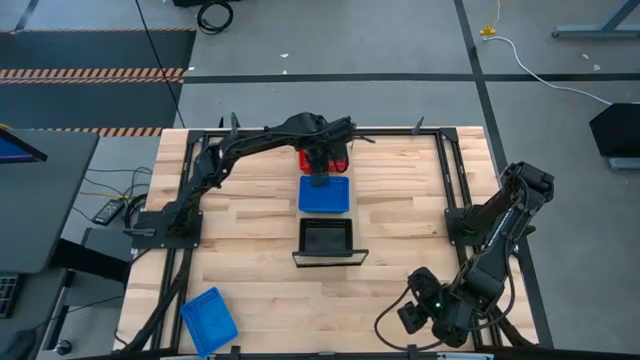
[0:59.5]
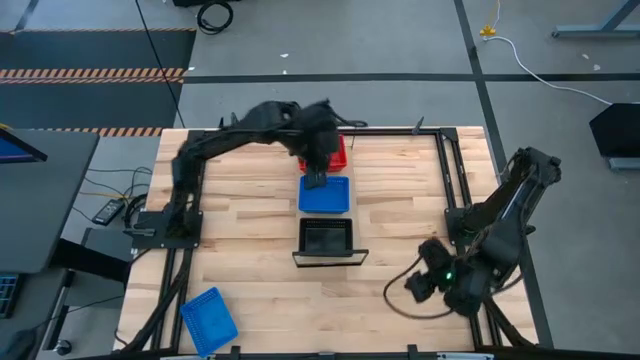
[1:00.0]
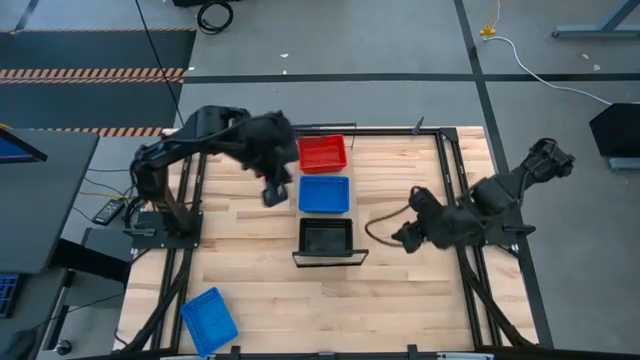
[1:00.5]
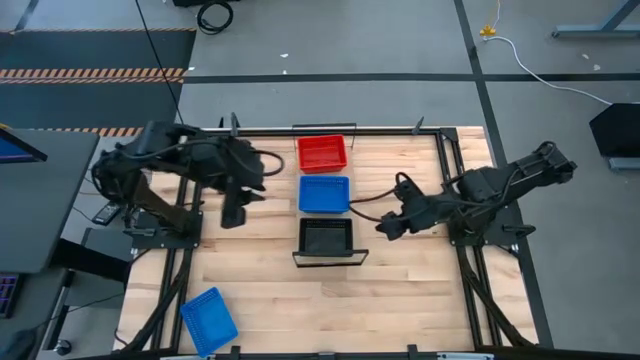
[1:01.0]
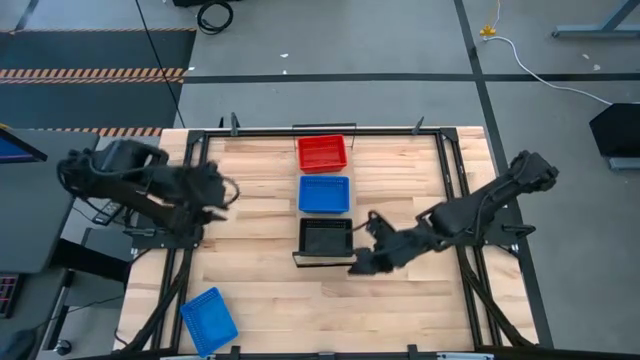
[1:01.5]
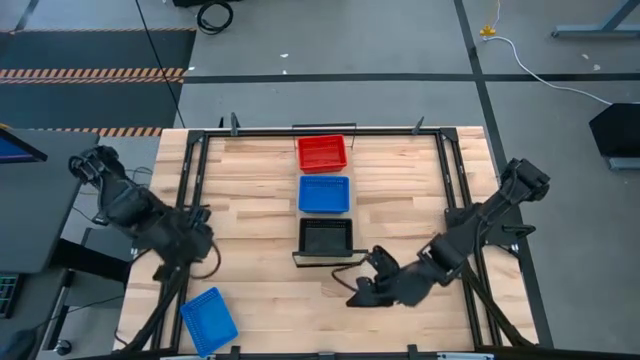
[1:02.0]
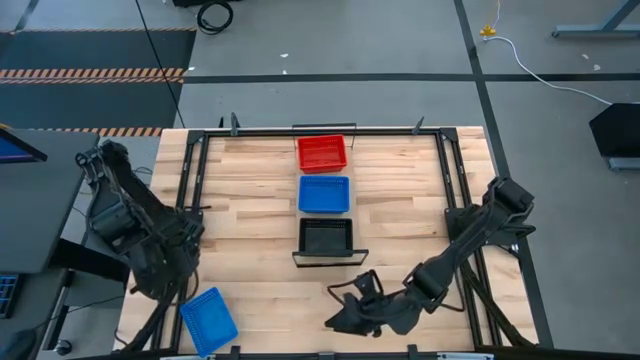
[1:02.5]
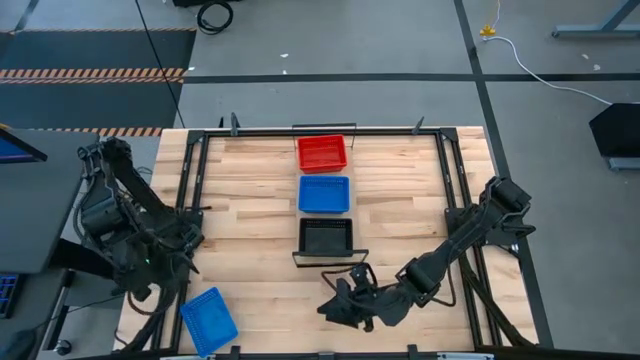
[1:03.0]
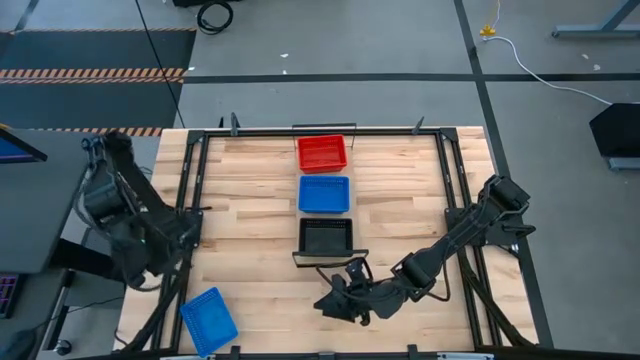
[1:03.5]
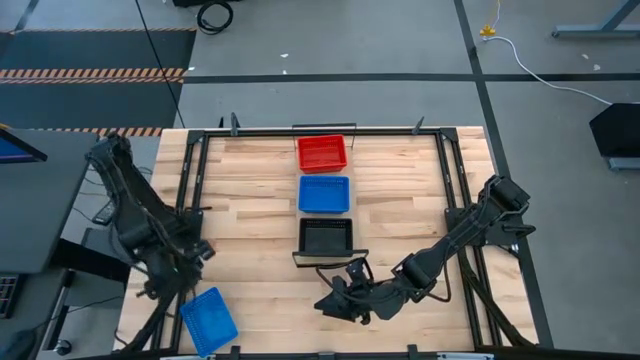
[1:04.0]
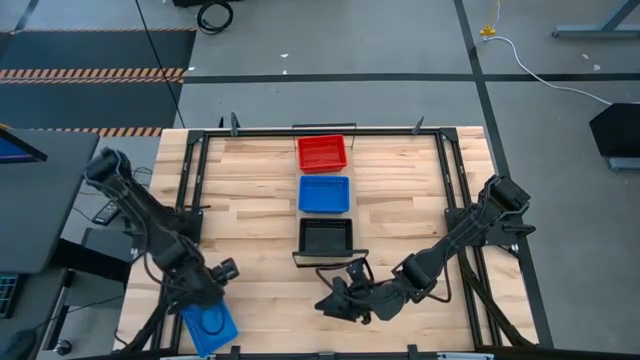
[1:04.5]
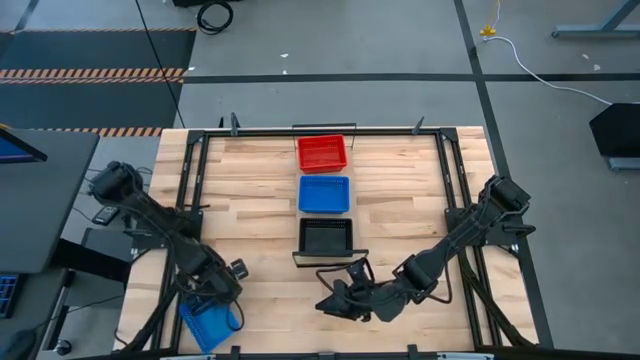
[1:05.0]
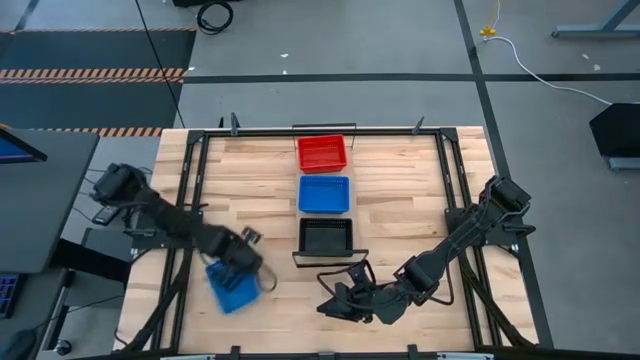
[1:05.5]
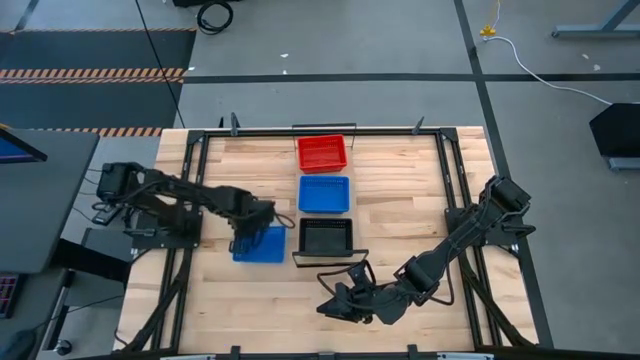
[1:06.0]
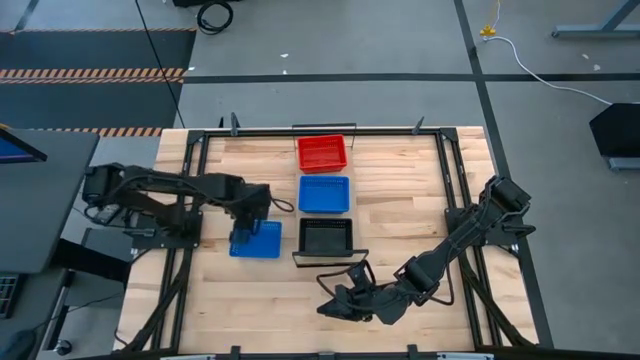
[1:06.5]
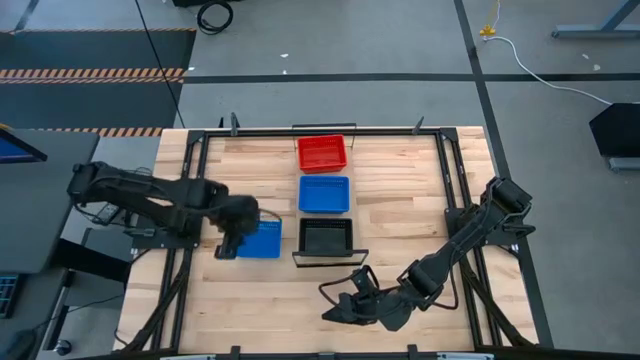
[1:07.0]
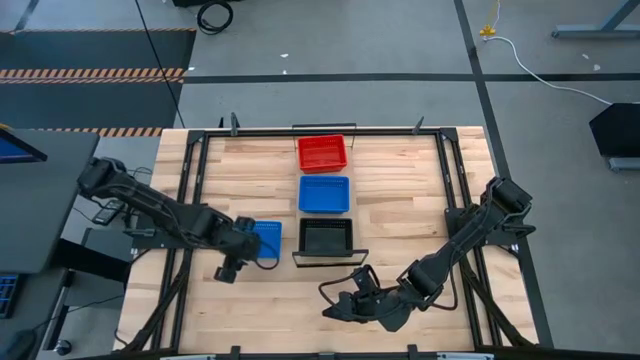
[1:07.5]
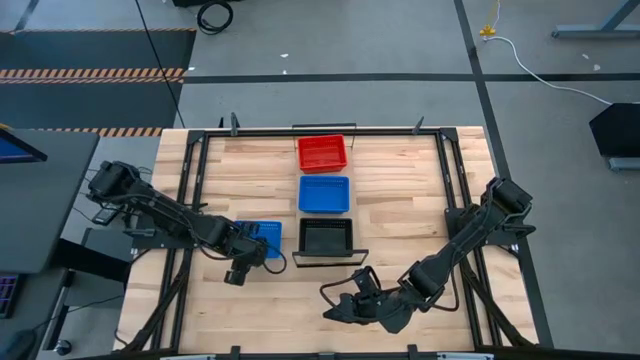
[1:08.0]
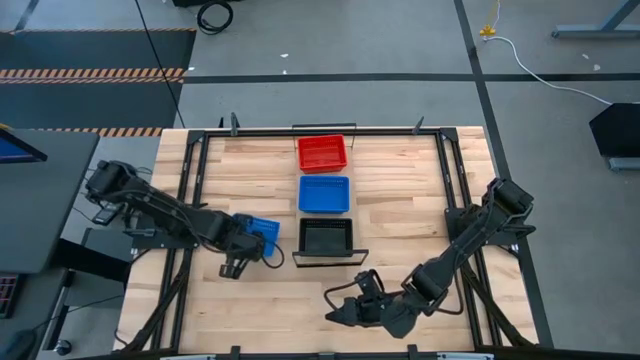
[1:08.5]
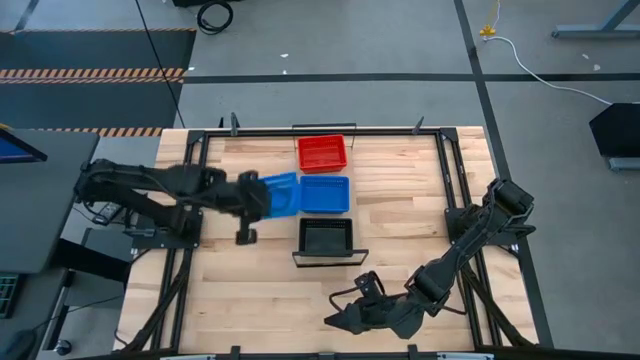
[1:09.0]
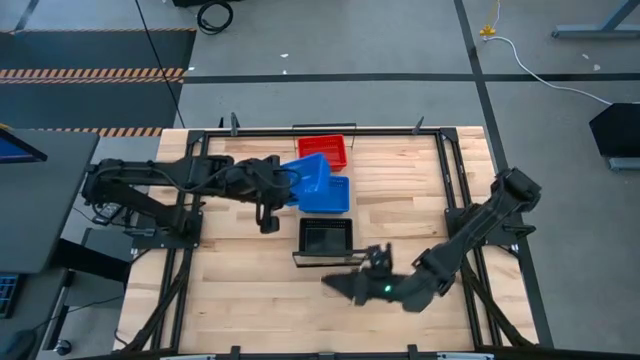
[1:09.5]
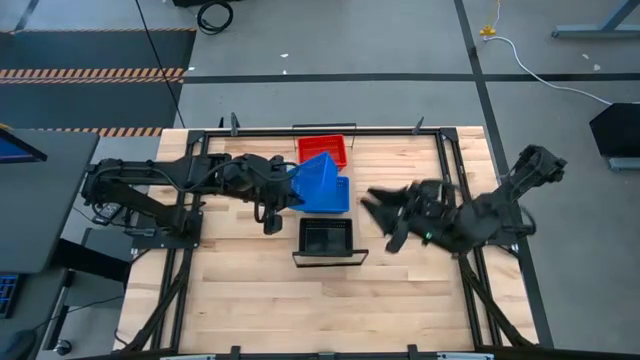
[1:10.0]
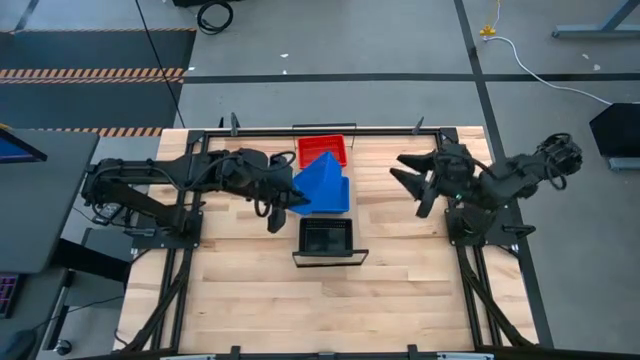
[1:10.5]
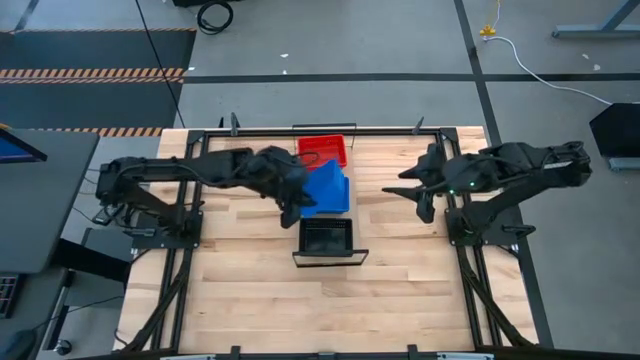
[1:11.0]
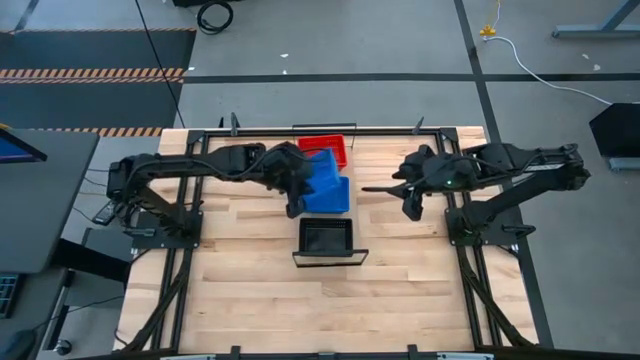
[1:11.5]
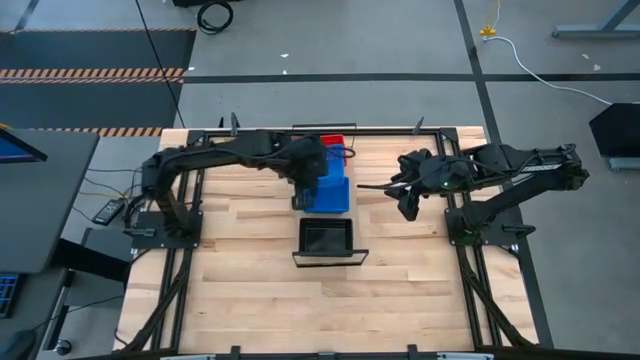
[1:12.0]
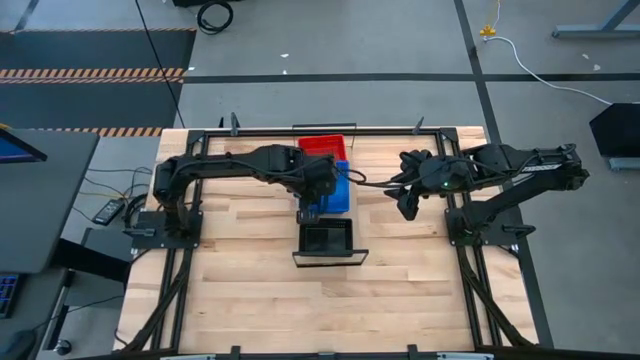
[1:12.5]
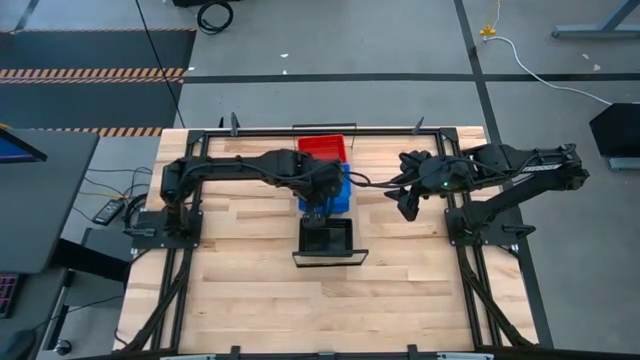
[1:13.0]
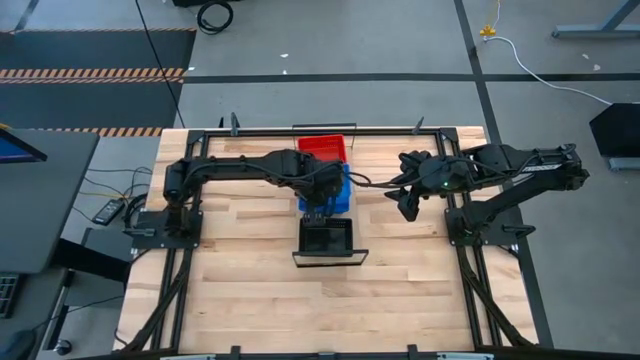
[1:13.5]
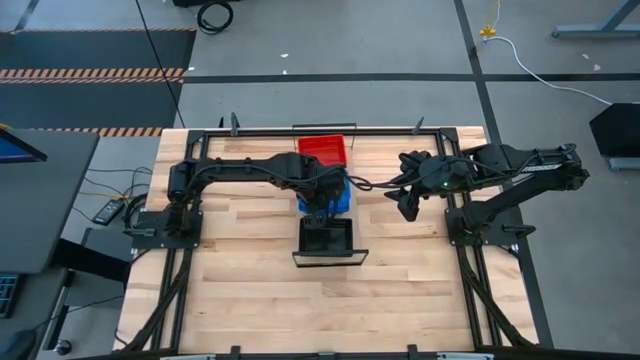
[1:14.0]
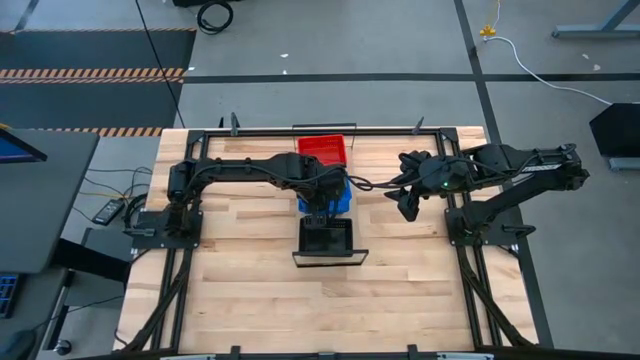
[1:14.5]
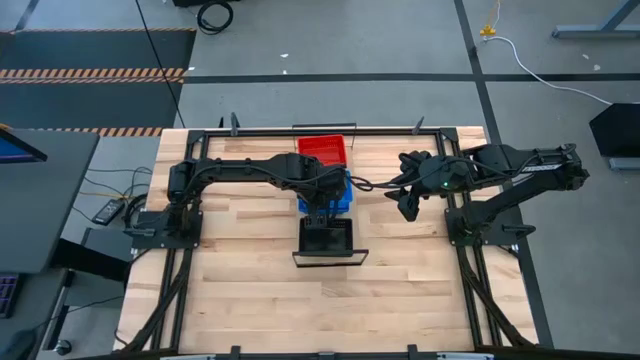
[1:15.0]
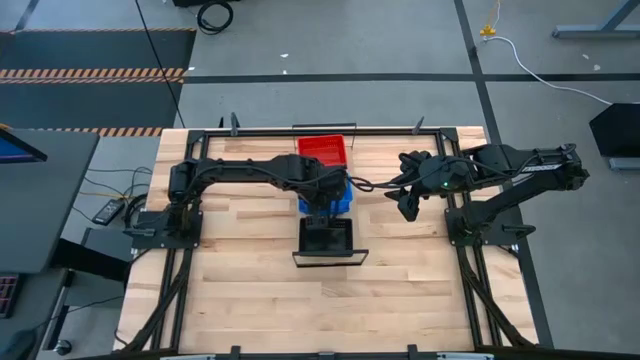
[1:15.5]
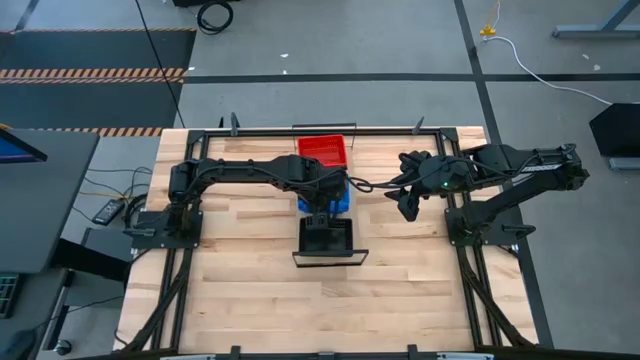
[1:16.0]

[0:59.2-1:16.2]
Task: Stack baskets on shelf by color
Stack the blue bin on the blue bins on the shelf

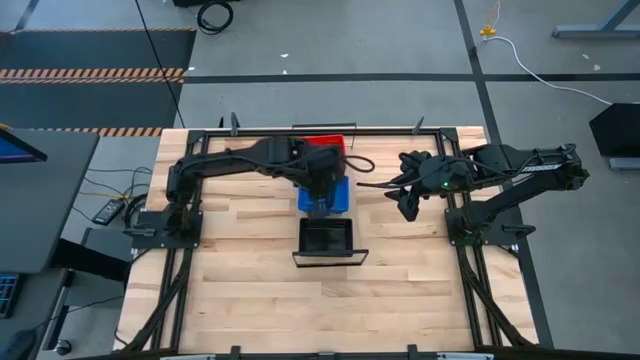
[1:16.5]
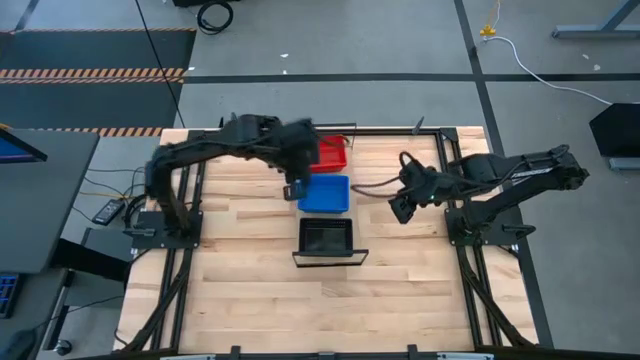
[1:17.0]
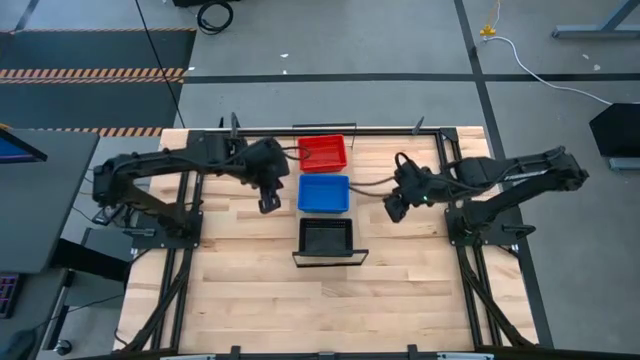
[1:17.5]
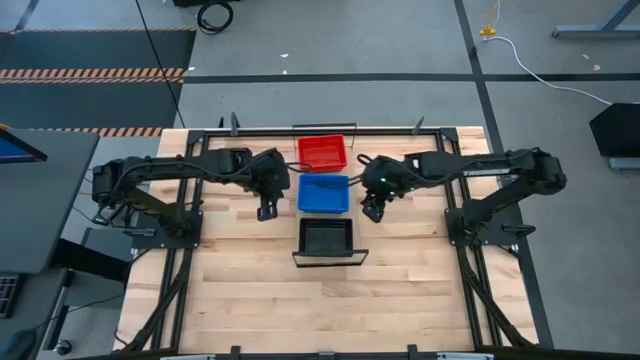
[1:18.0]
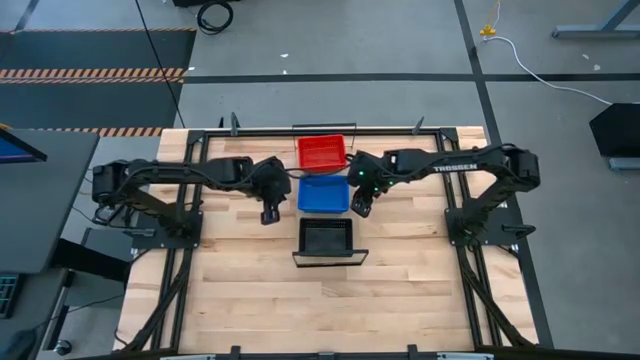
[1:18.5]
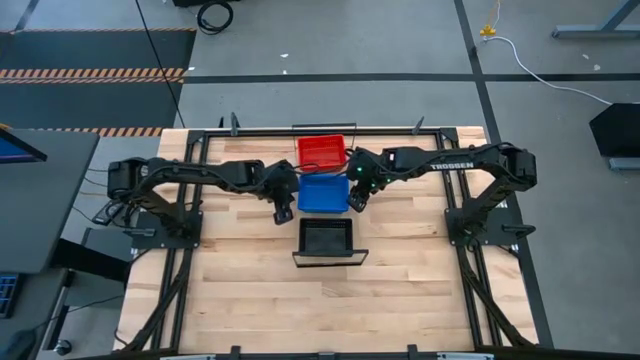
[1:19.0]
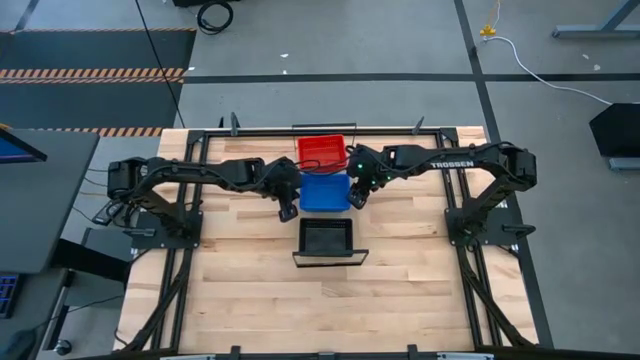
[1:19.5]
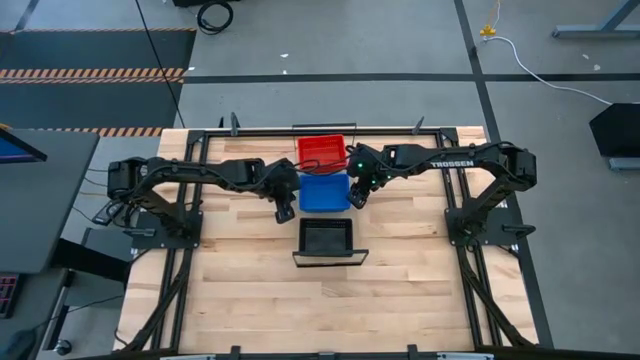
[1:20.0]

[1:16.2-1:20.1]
Adjust the blue bins on the shelf

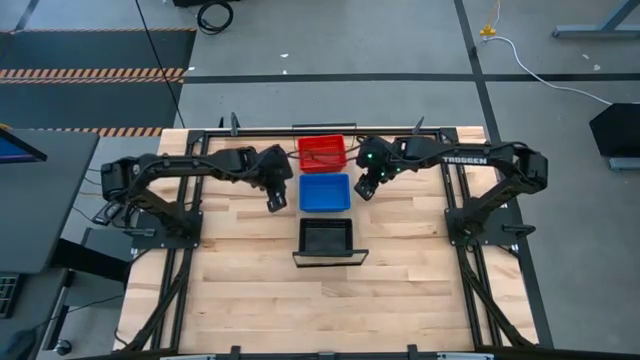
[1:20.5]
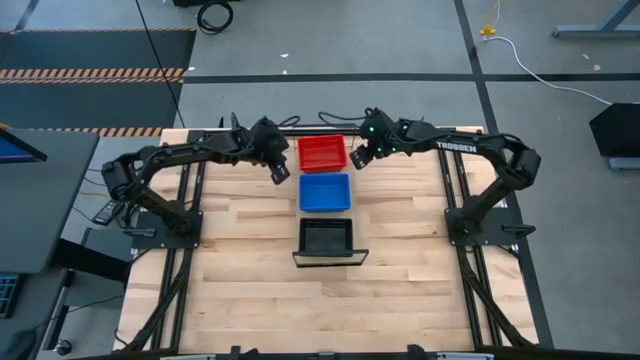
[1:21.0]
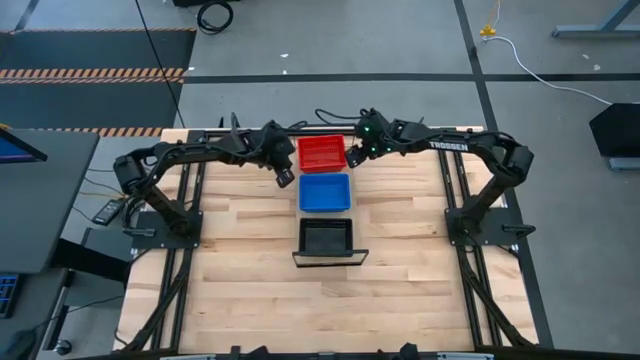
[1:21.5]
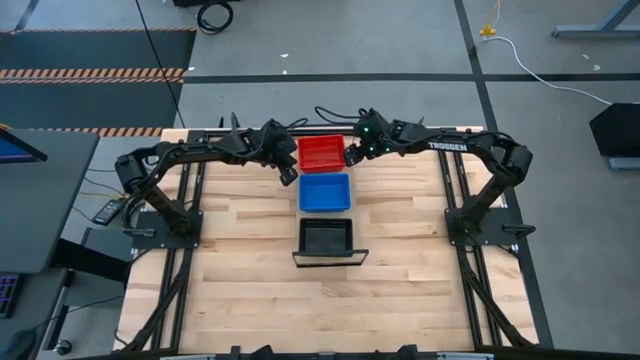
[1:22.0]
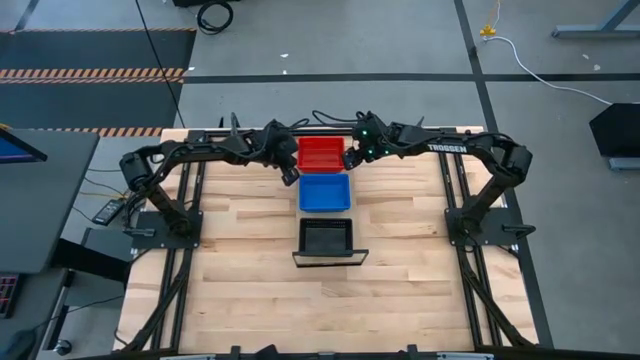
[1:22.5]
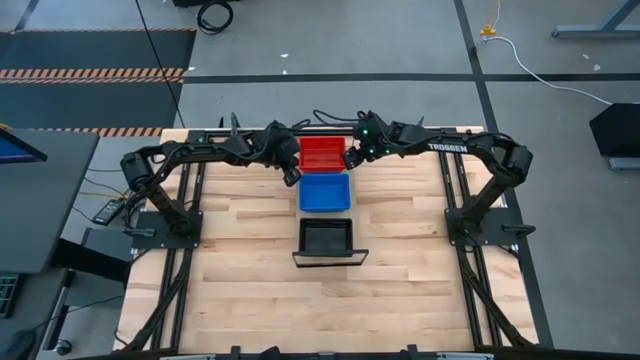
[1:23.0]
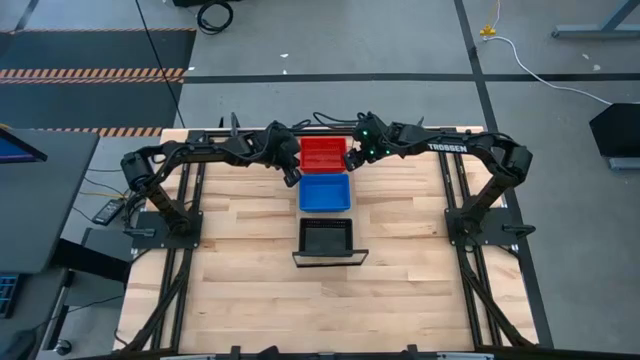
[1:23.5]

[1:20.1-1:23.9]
Adjust the red bins on the shelf
